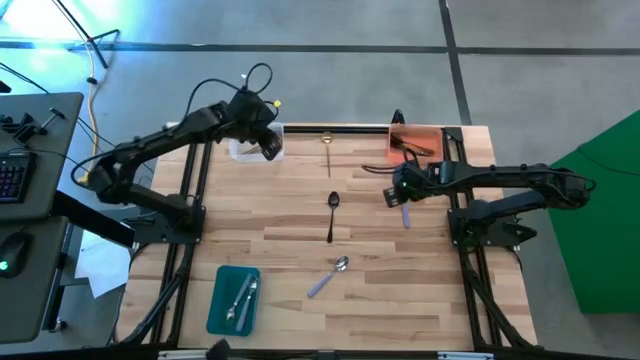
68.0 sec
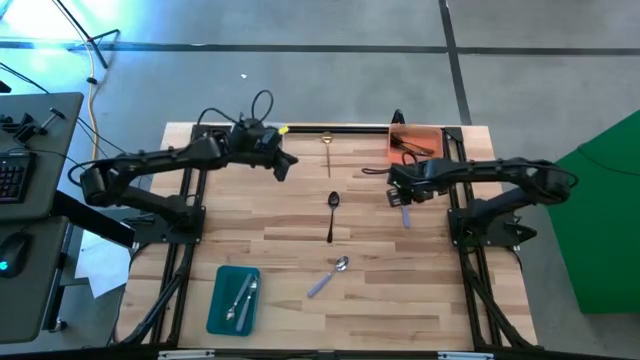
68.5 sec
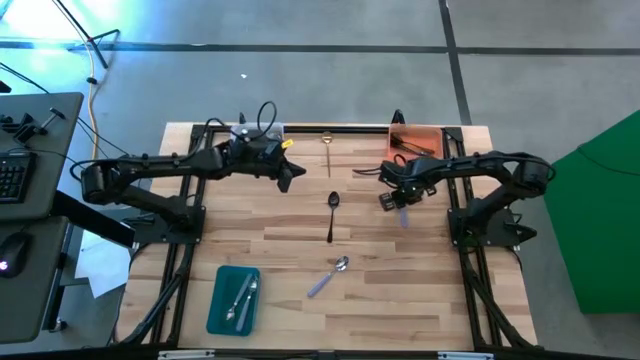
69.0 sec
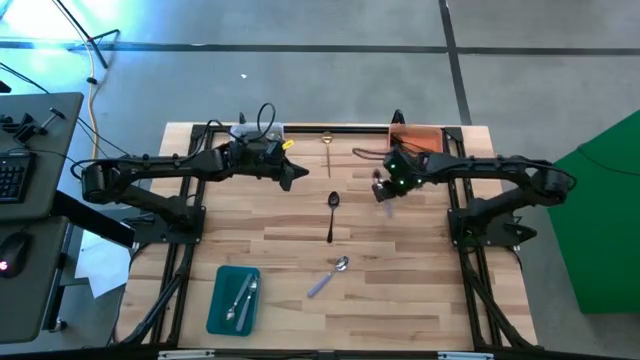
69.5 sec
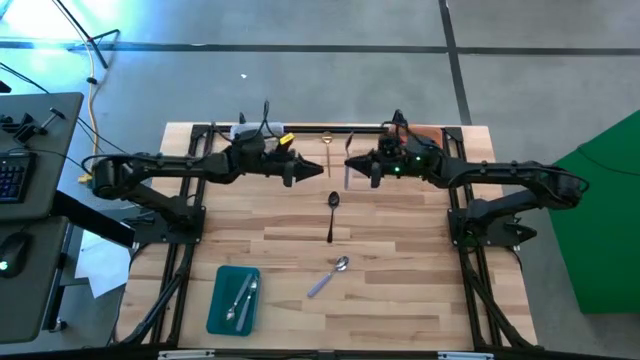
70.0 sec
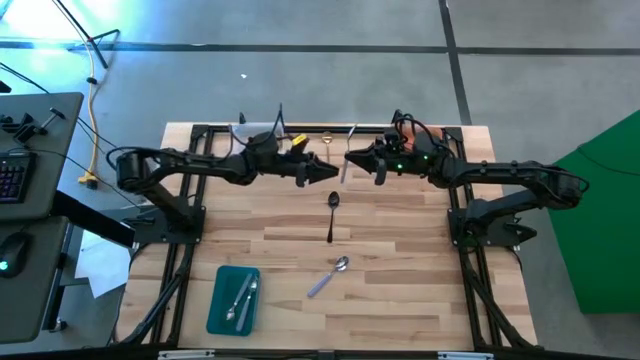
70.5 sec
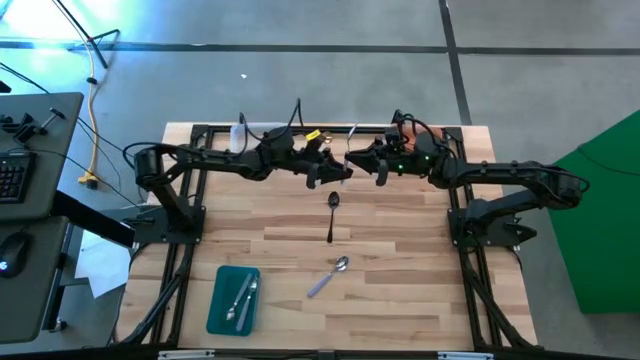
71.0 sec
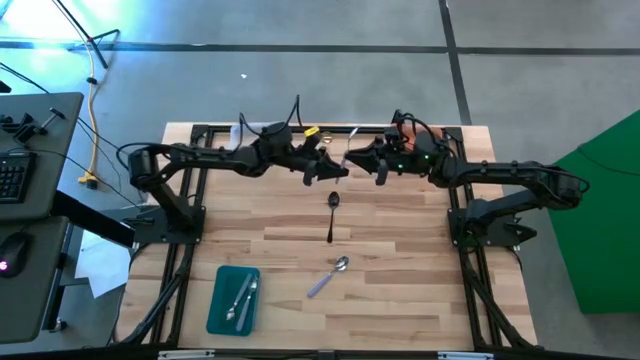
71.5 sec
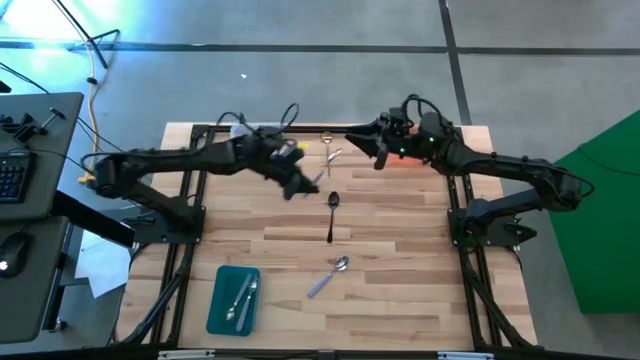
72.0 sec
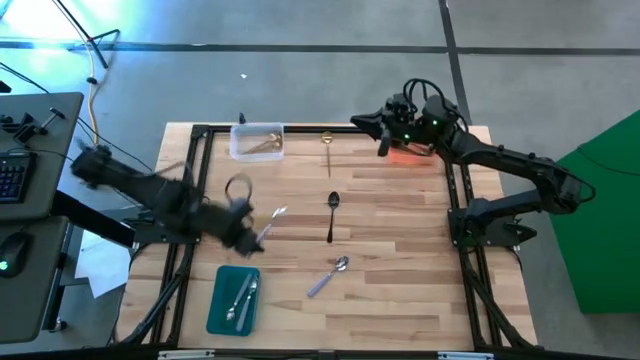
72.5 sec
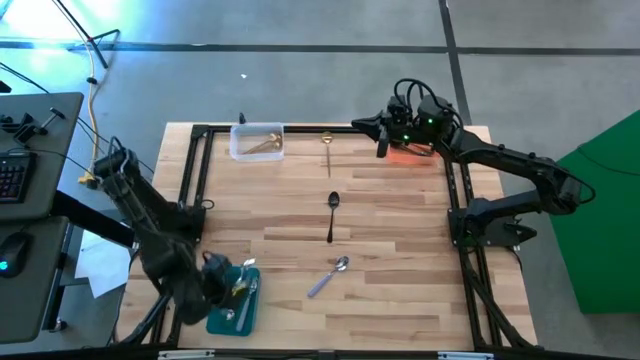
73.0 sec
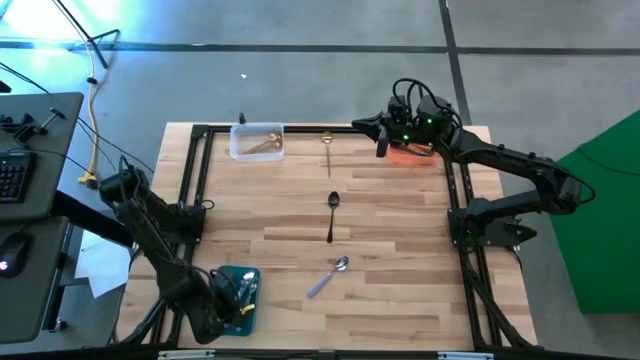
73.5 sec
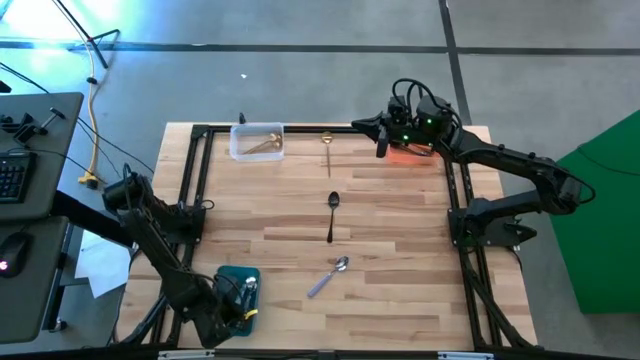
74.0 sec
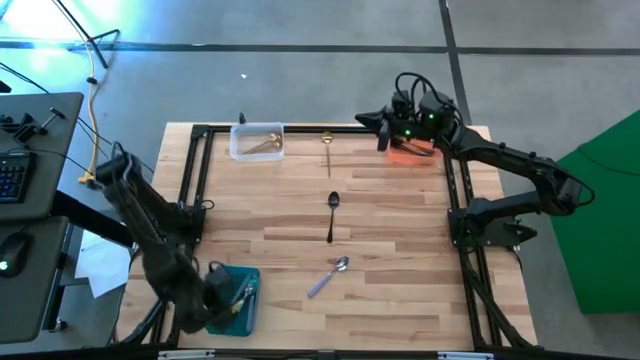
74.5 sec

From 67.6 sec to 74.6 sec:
Task: Sort silverware by color (type)
Put the middle purple spoon into the blue bin

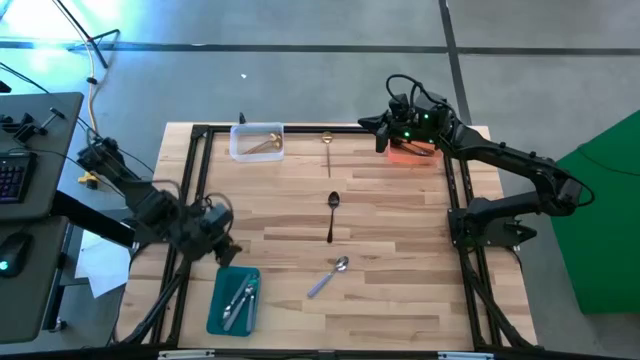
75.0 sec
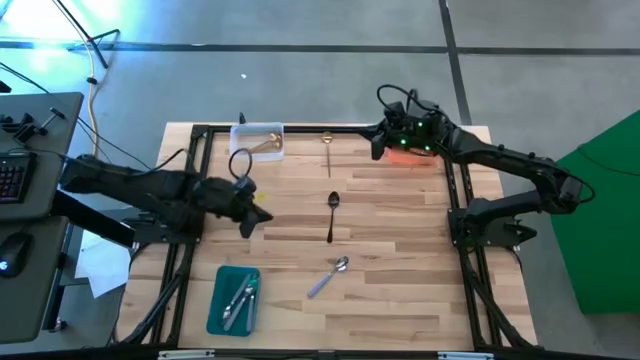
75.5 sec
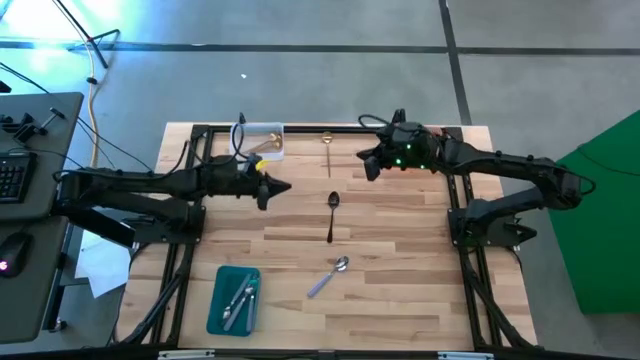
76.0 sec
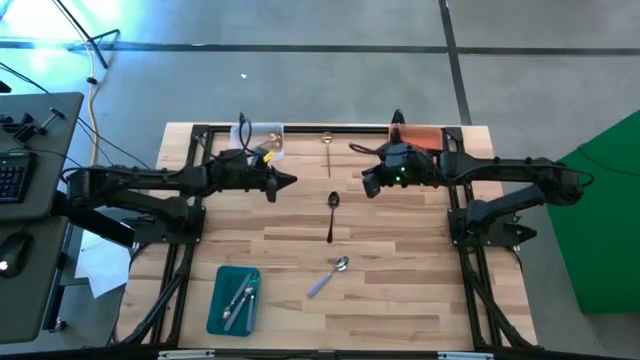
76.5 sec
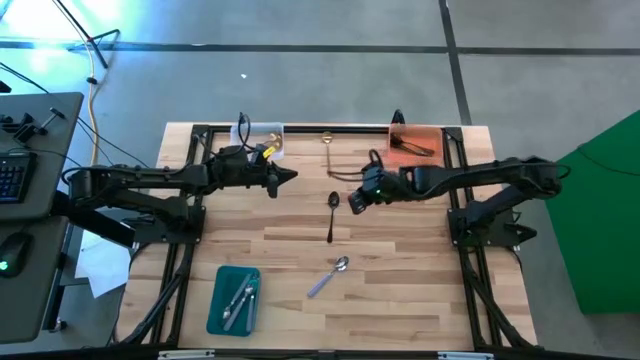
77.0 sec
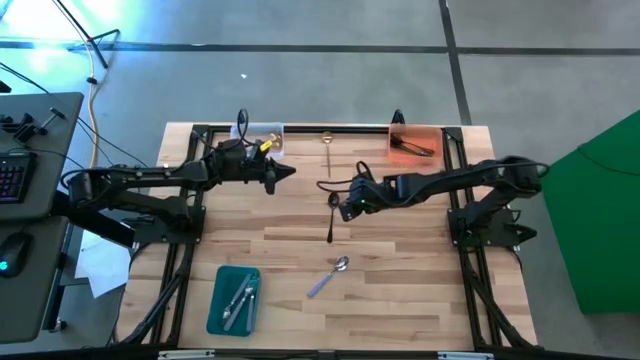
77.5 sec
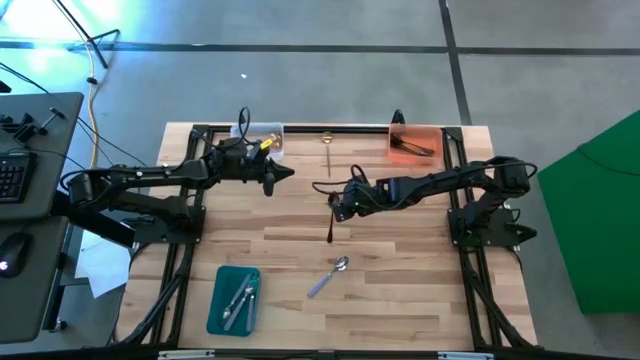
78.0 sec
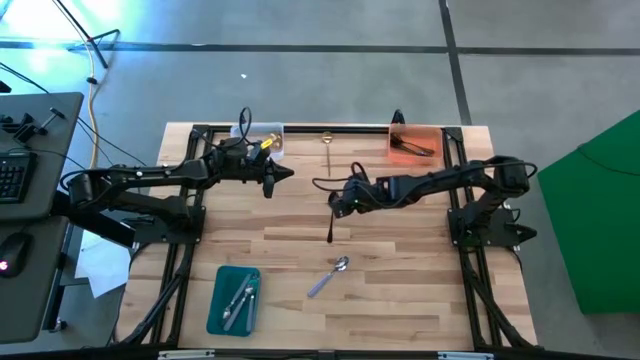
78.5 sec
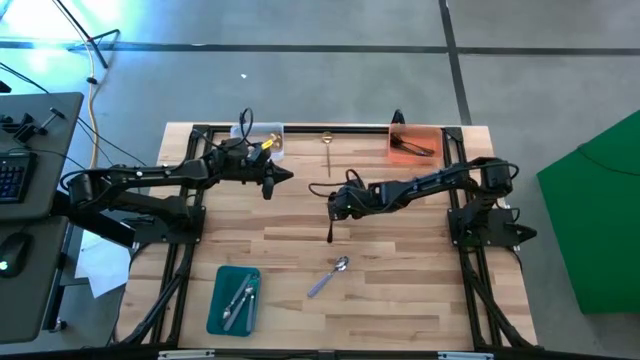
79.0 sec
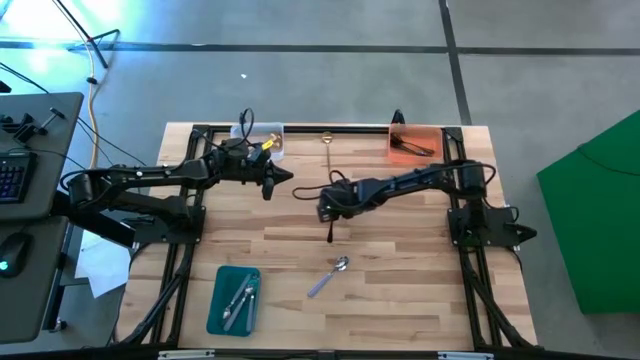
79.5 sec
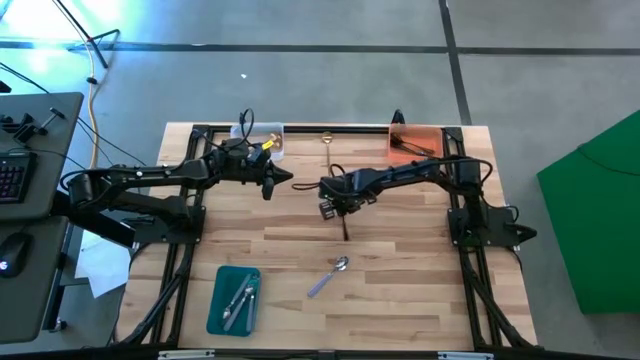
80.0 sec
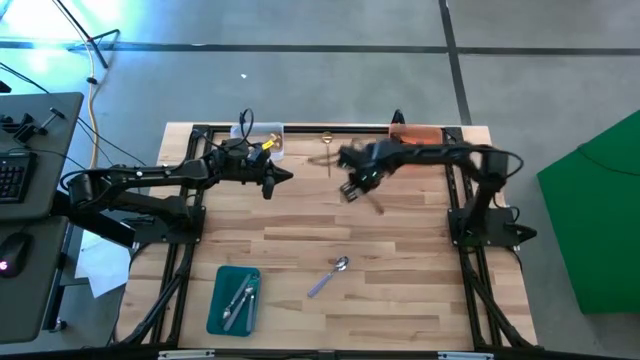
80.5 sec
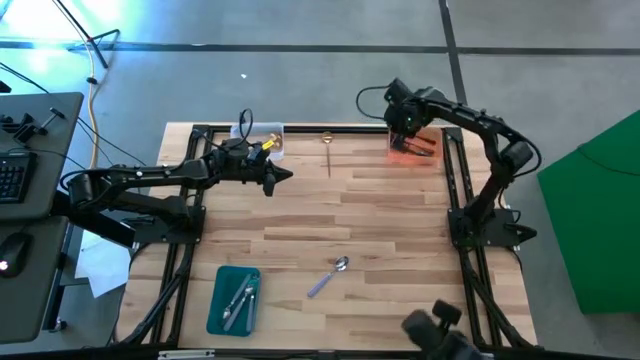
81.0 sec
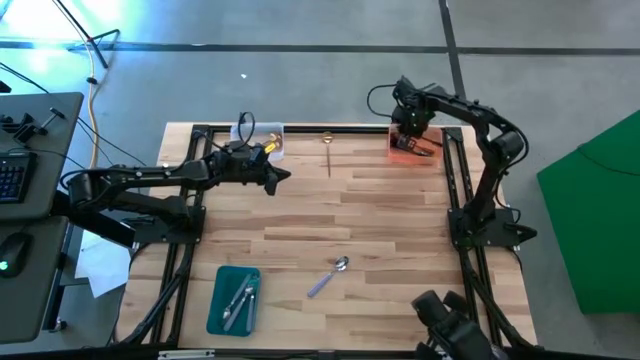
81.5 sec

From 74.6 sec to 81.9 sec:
Put the black spoon into the orange bin

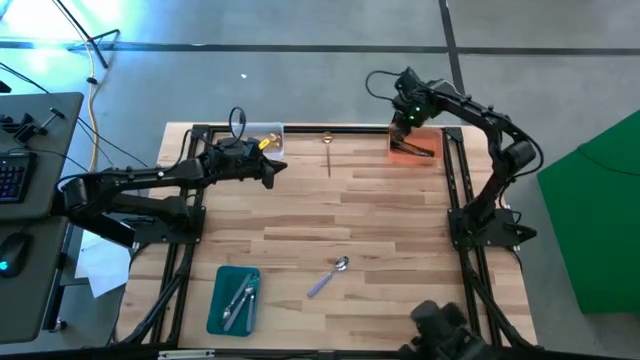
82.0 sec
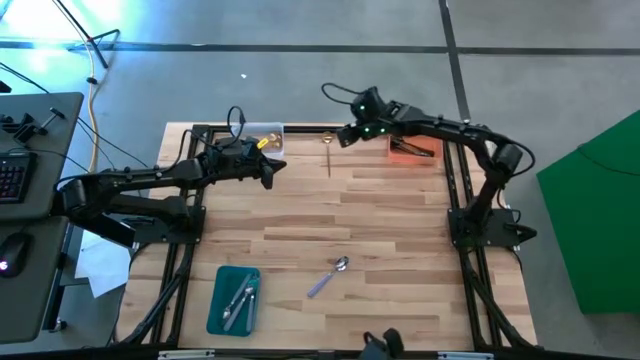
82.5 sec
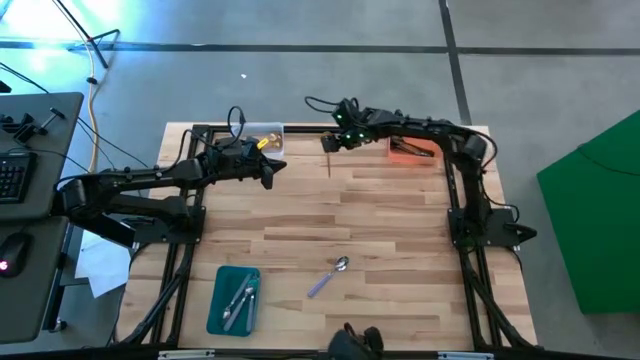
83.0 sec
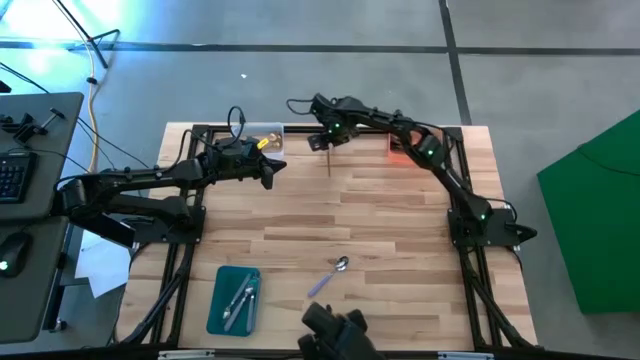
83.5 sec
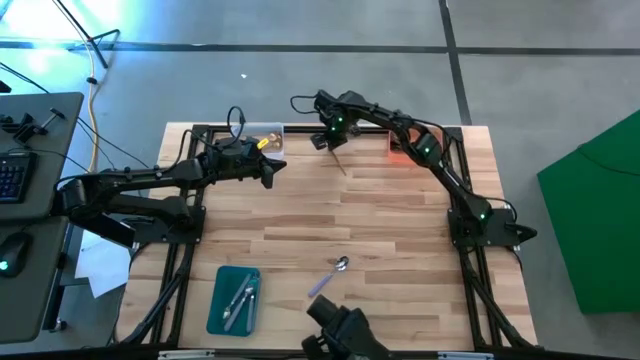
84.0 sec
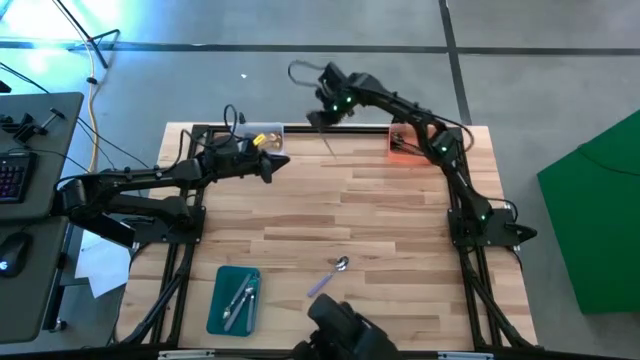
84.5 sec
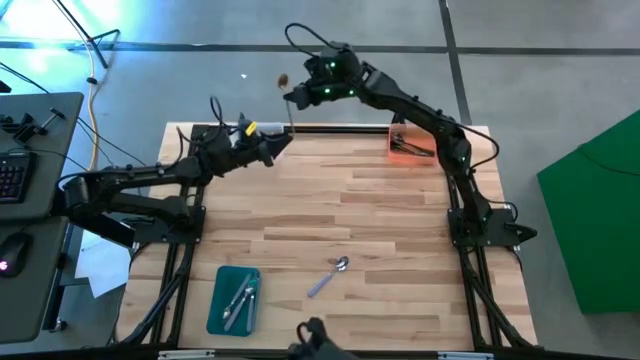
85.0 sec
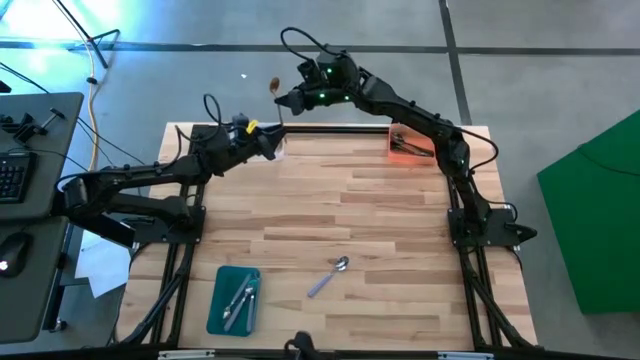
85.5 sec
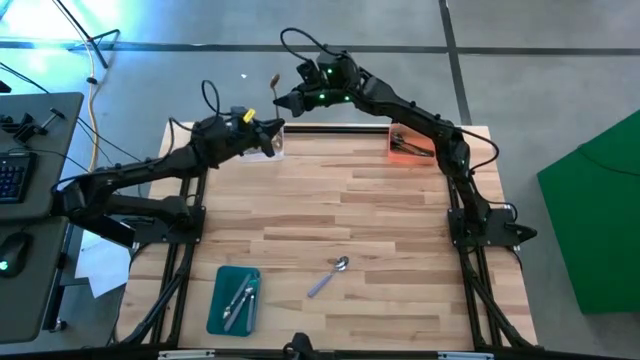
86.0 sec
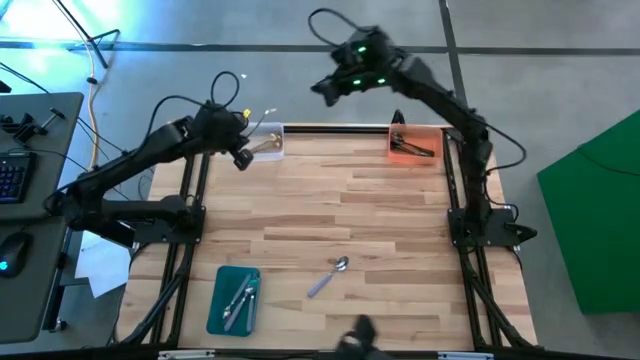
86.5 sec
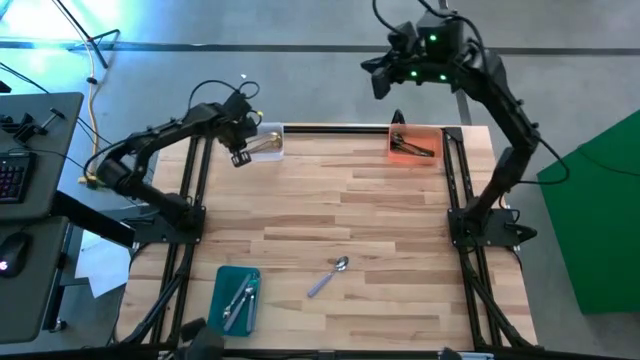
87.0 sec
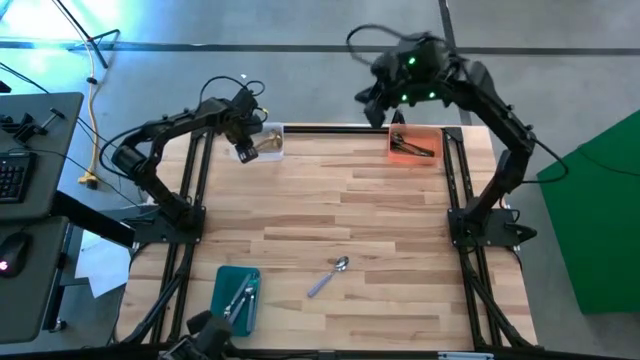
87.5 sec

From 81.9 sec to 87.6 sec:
Put the gold spoon into the transparent bin

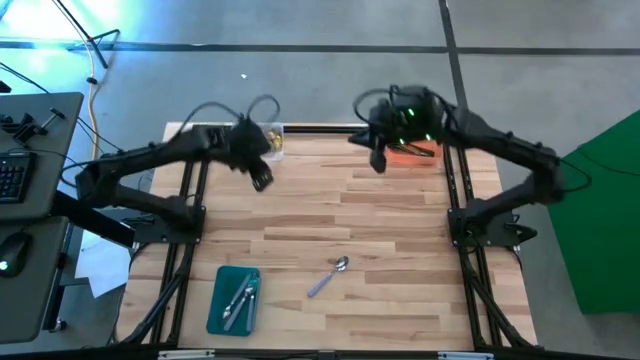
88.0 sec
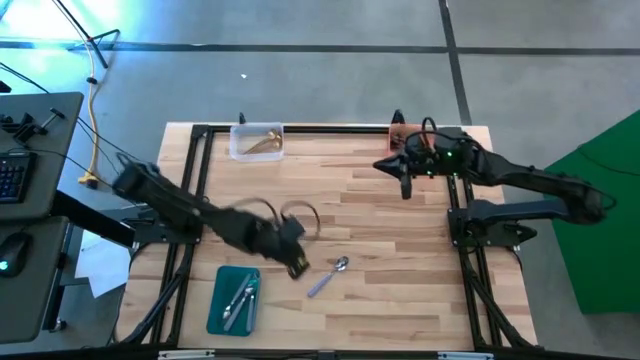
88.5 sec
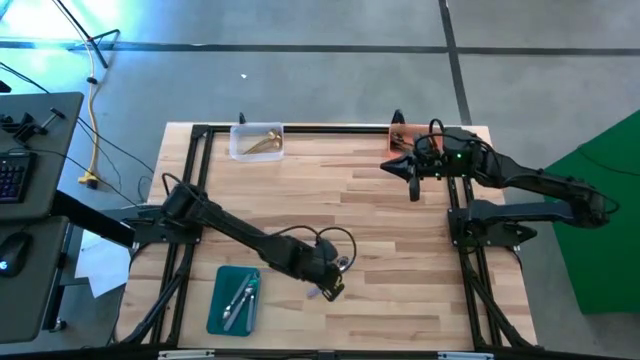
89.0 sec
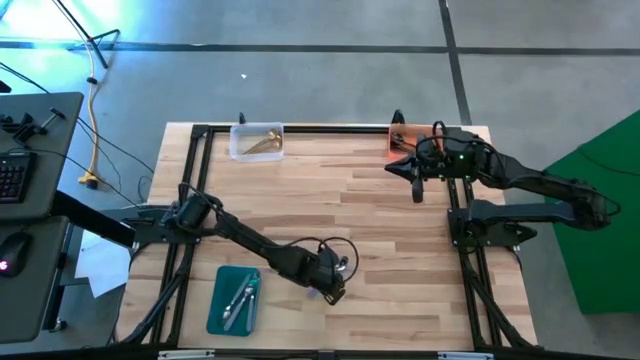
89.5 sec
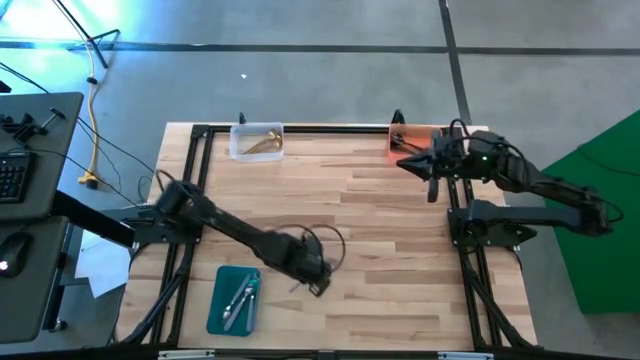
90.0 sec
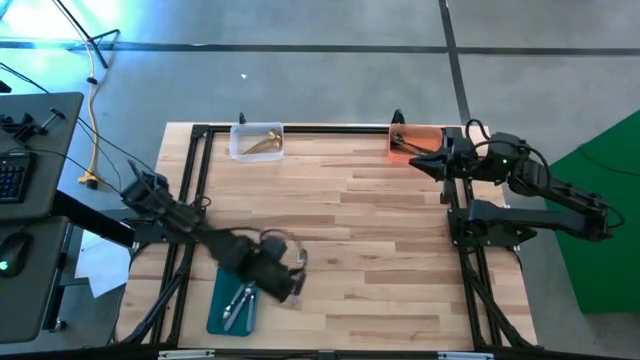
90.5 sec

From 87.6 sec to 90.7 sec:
Put the purple spoon into the blue bin
